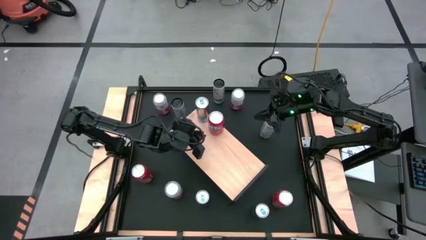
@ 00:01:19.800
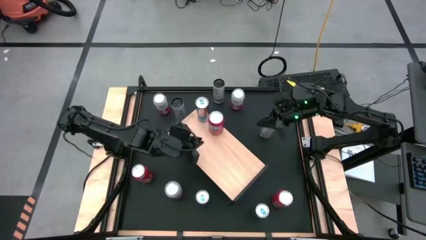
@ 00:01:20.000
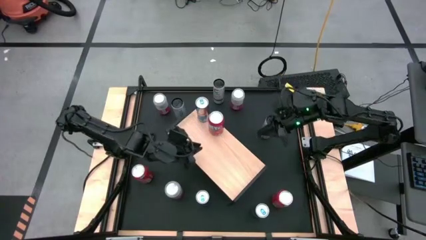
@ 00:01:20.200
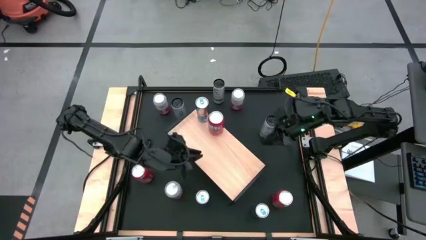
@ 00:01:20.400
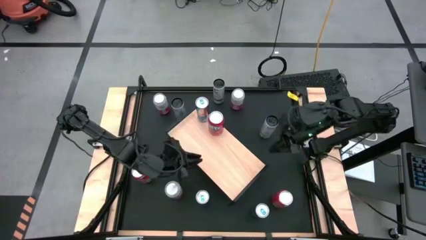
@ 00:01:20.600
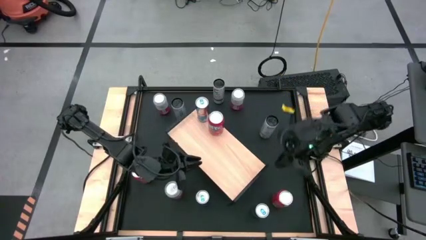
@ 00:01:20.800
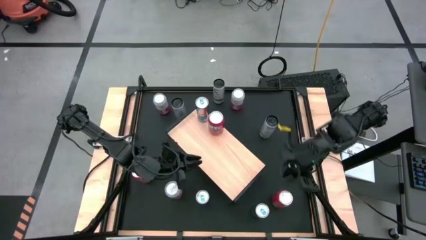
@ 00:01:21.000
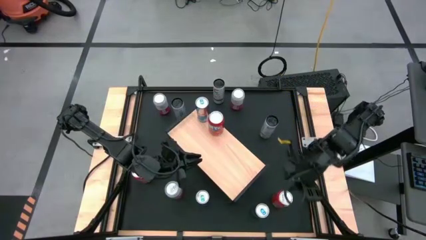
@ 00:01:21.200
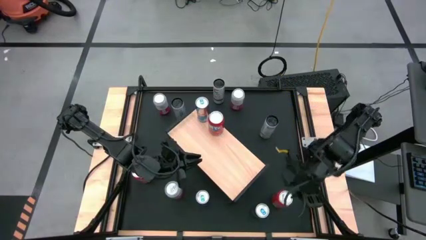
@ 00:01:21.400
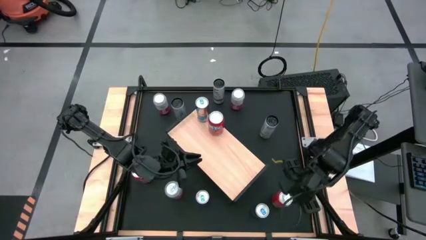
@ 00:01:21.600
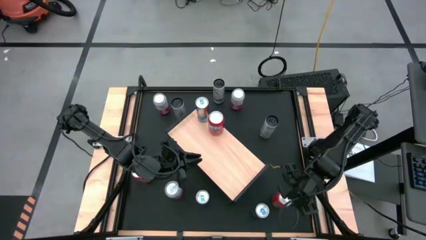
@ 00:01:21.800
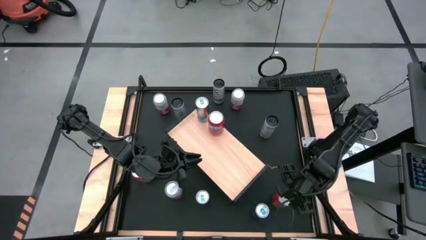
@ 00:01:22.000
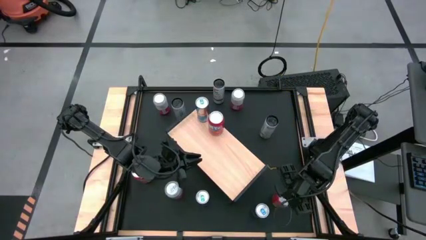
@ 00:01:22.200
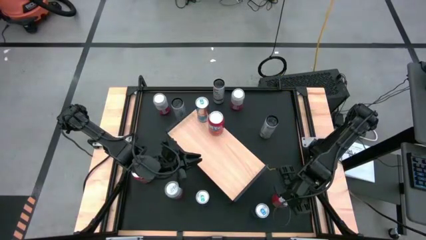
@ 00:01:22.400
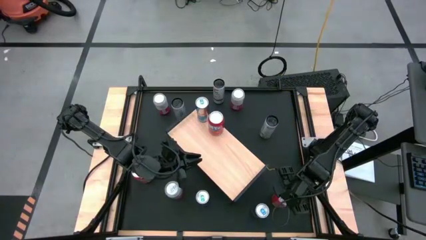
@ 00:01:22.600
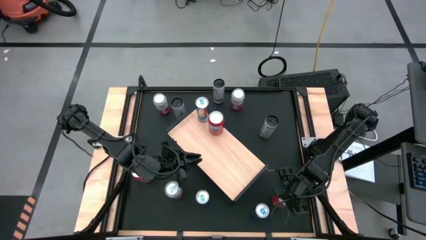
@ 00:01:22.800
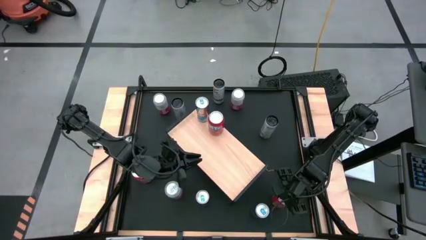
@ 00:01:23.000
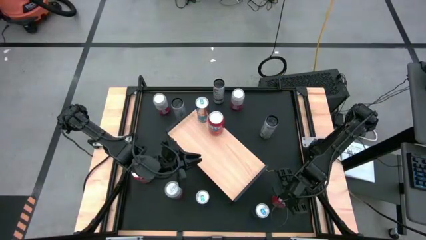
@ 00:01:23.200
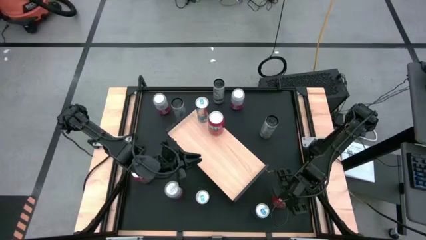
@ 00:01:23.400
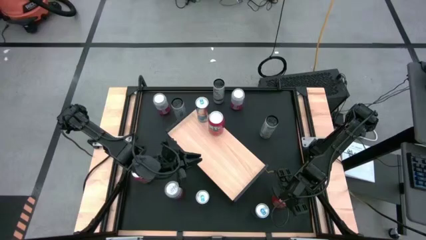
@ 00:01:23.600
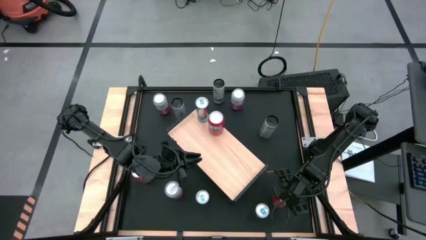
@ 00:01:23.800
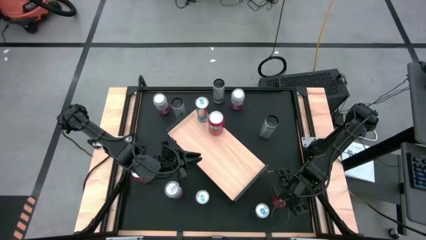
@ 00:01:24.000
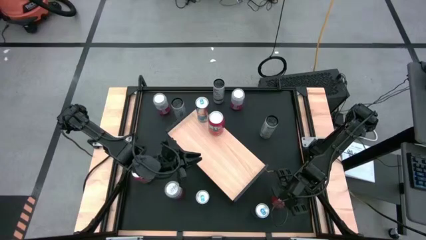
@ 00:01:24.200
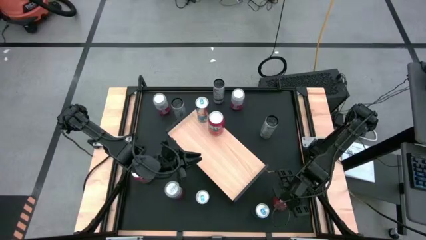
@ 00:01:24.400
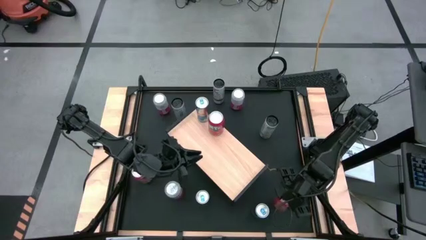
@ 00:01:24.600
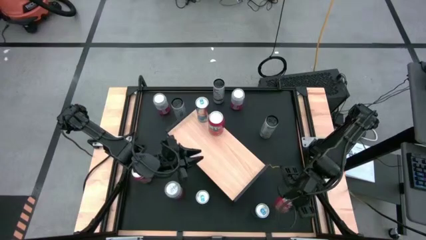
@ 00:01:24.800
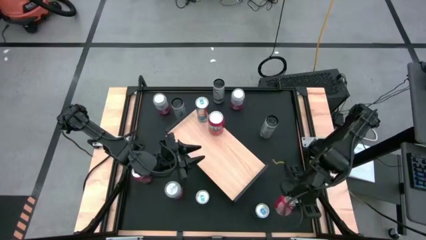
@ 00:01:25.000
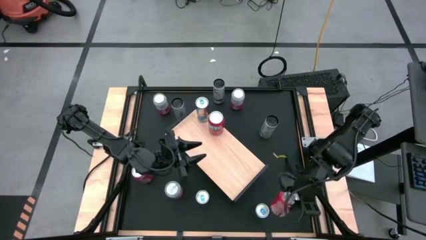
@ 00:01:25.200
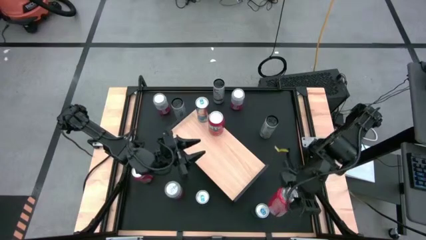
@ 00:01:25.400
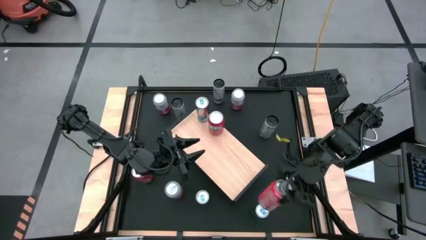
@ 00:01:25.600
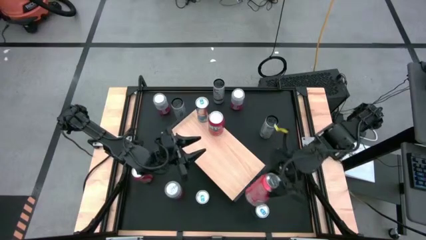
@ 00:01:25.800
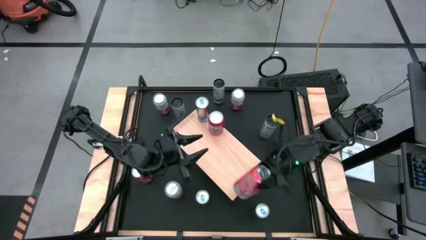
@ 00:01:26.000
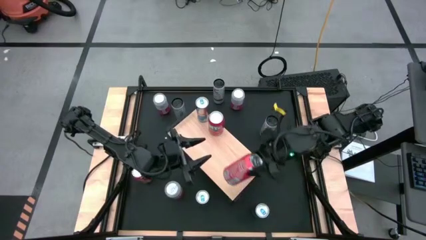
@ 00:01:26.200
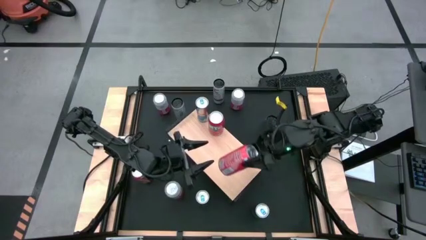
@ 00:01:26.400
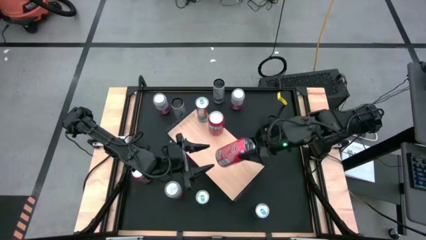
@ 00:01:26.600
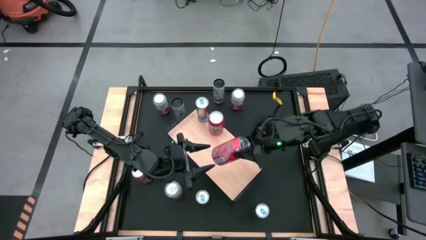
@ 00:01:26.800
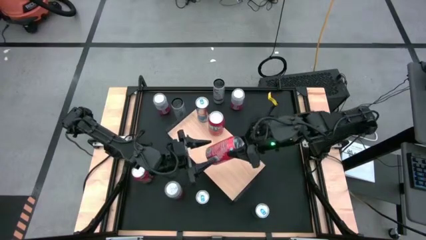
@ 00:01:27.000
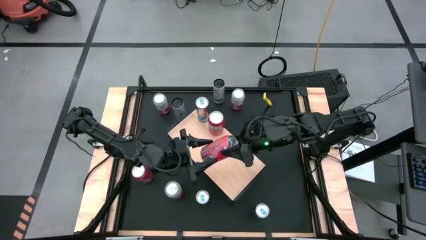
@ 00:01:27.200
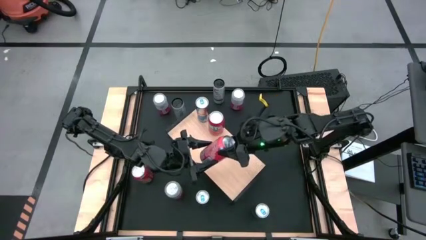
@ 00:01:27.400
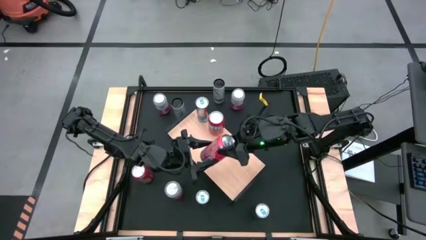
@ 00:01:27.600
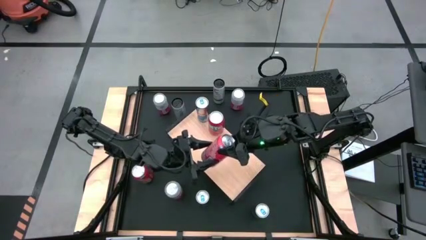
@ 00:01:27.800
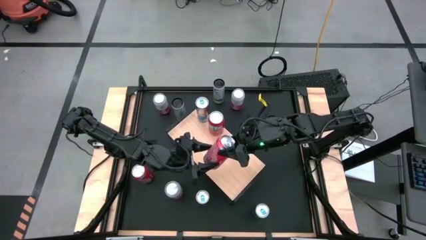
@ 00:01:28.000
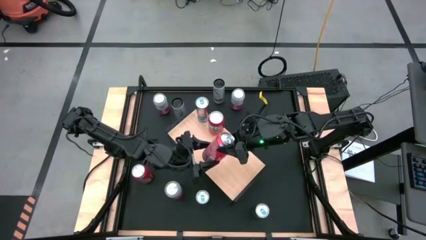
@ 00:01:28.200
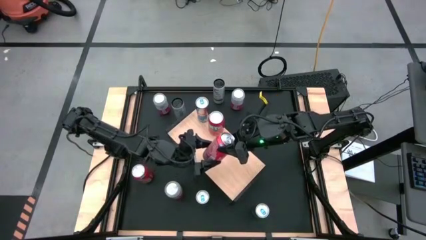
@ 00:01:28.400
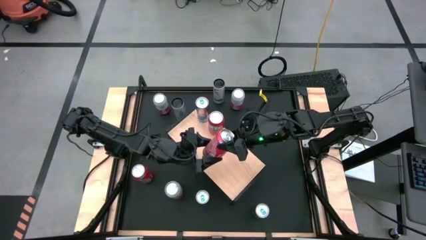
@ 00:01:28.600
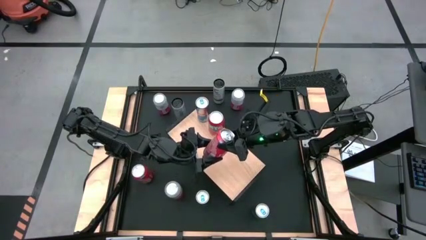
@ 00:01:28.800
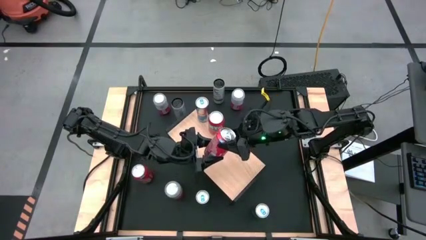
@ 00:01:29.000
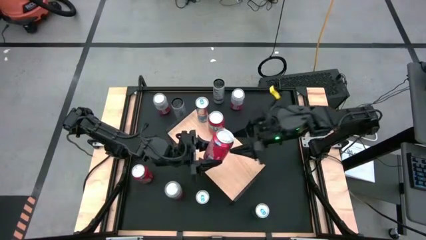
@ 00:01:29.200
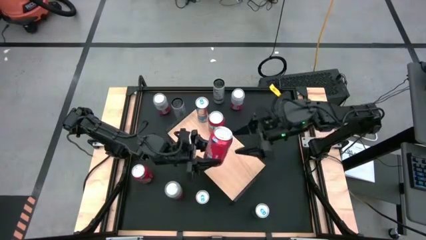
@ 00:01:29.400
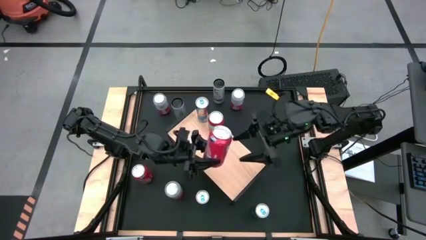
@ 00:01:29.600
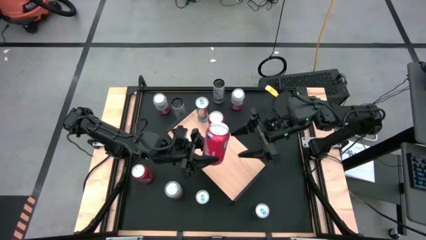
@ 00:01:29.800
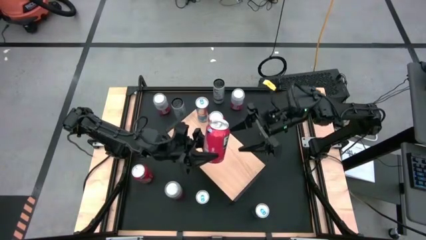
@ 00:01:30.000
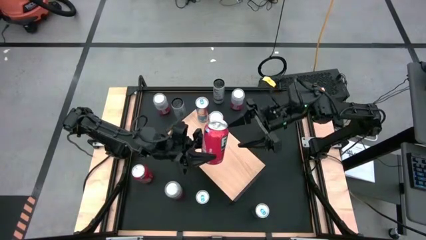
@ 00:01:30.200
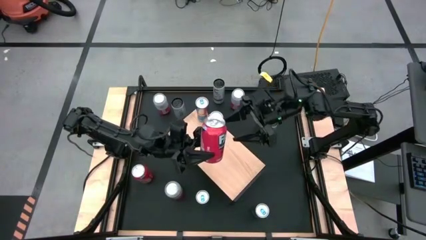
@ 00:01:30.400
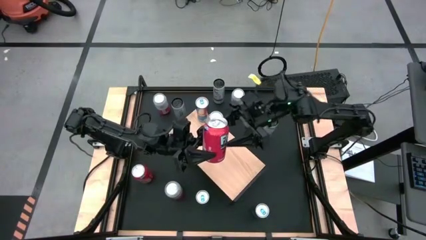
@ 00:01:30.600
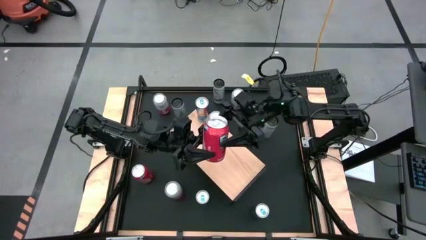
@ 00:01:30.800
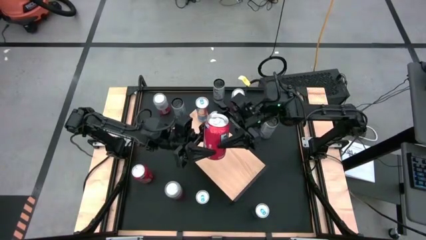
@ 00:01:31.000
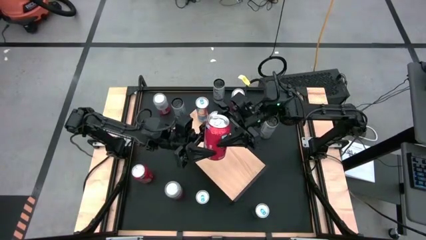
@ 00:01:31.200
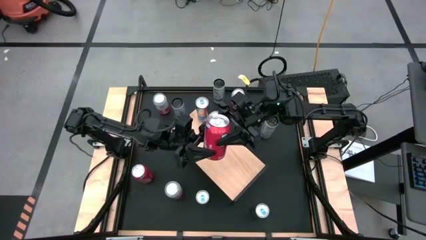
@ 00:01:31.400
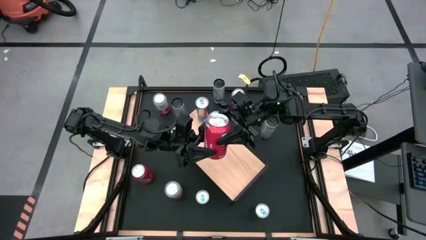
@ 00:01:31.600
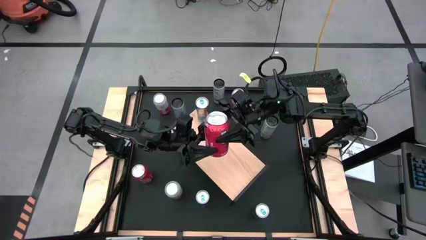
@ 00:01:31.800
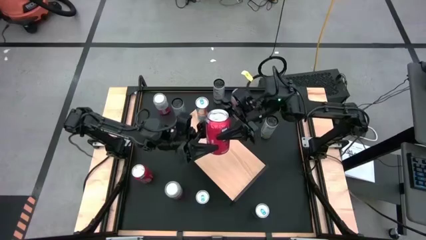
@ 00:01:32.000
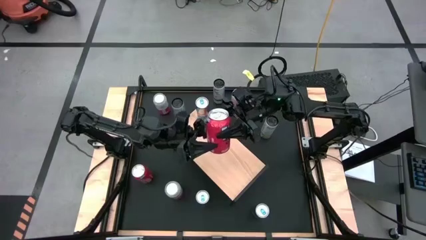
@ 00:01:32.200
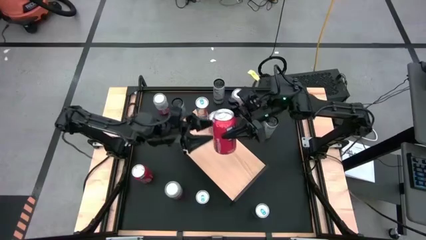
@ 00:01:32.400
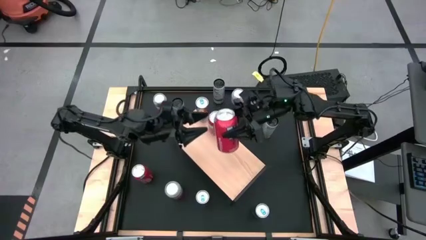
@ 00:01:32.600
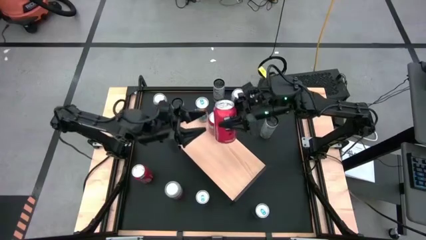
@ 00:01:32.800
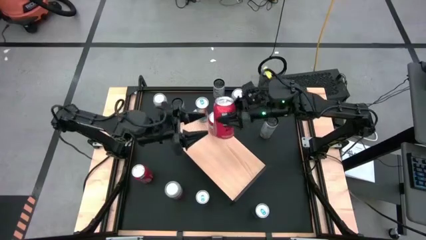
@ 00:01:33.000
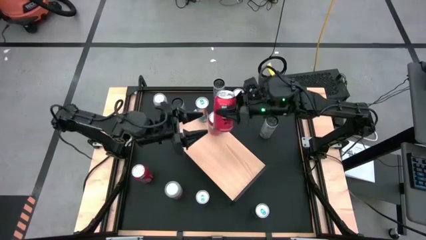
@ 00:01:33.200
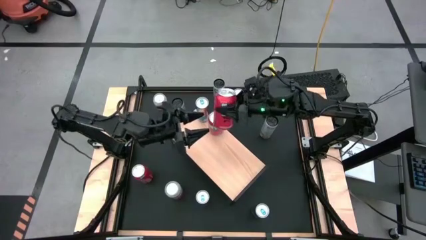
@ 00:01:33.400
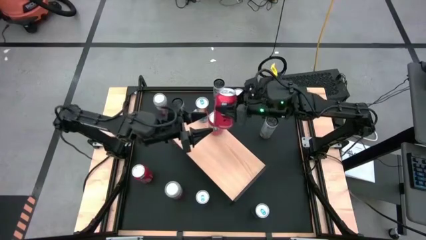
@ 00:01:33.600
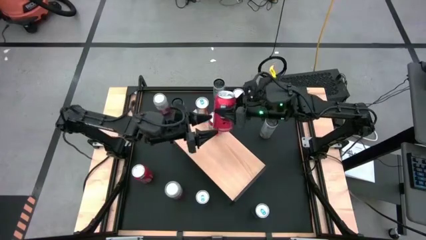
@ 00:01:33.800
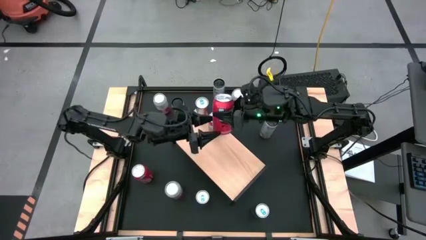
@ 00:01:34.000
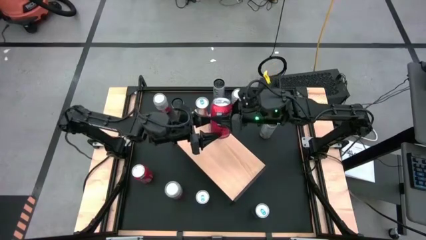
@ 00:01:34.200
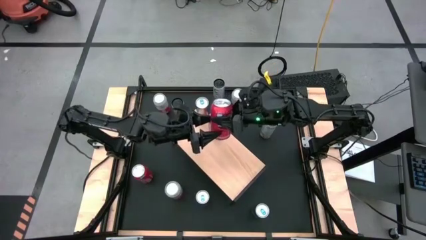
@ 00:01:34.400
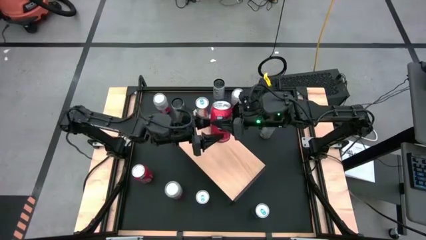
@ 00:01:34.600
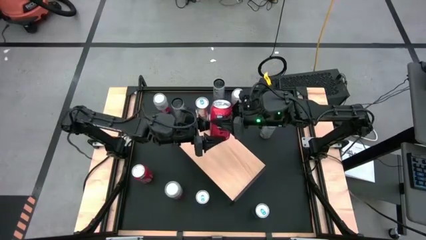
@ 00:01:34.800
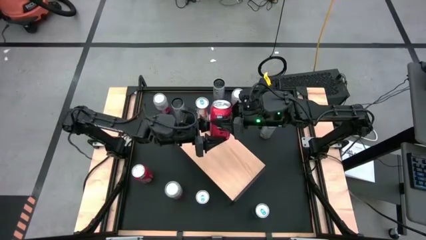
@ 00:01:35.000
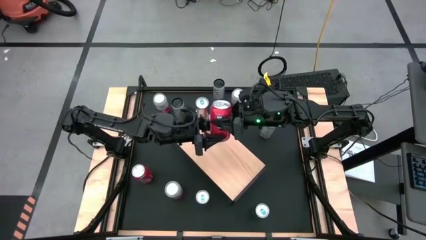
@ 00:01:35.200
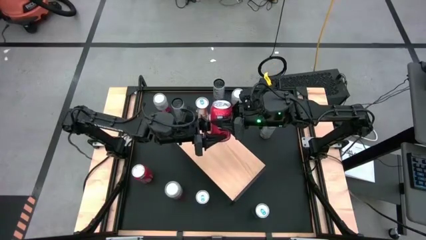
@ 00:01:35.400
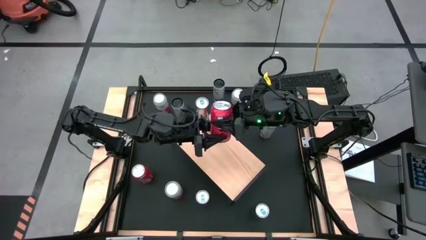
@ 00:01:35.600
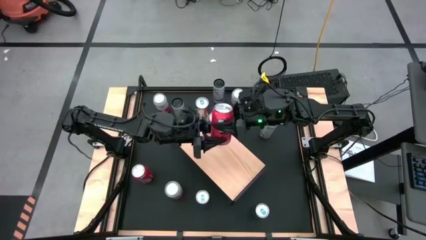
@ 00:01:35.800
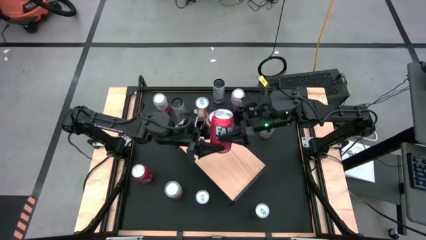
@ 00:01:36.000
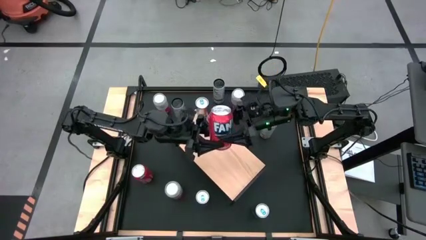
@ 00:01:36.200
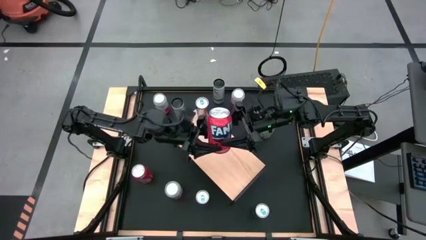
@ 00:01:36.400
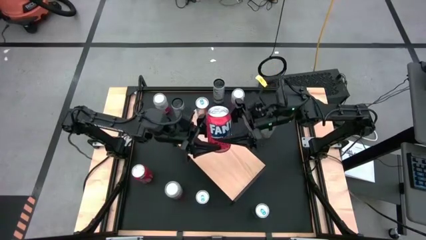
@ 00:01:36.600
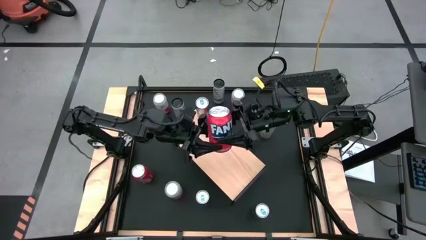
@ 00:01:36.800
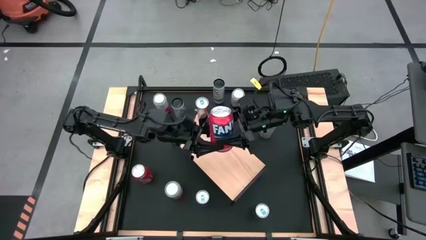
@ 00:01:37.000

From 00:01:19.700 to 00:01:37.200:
Task: Place canned beverage on shelf
Put the bottom red soda can on the shelf aligned with the other red soda can
